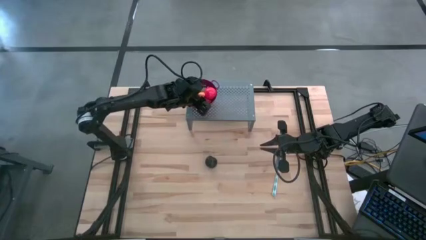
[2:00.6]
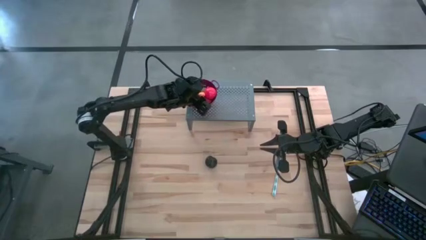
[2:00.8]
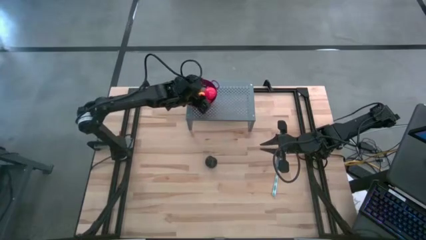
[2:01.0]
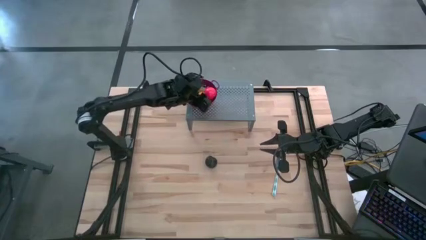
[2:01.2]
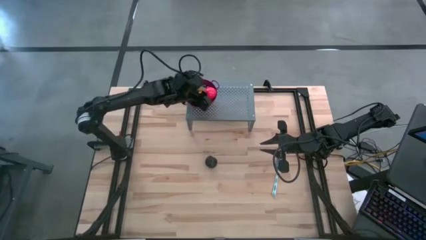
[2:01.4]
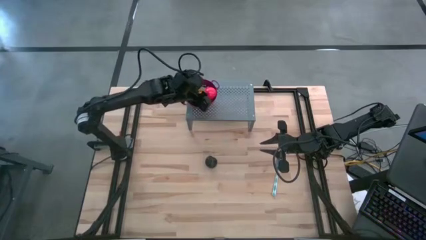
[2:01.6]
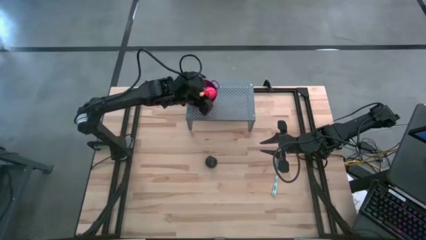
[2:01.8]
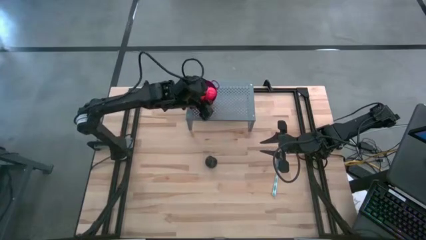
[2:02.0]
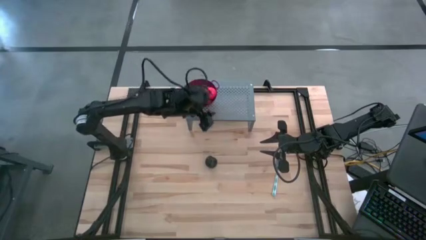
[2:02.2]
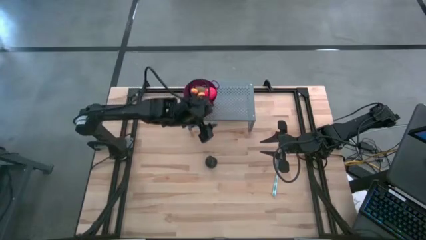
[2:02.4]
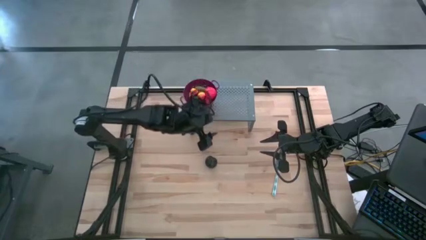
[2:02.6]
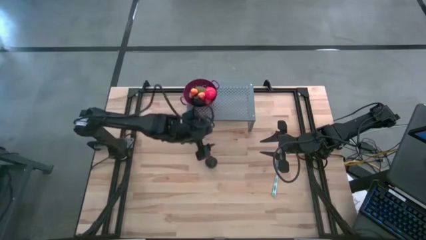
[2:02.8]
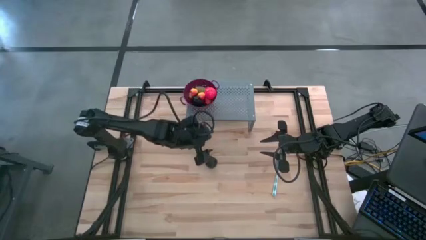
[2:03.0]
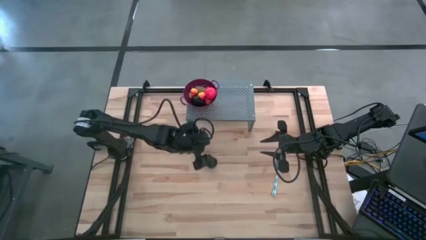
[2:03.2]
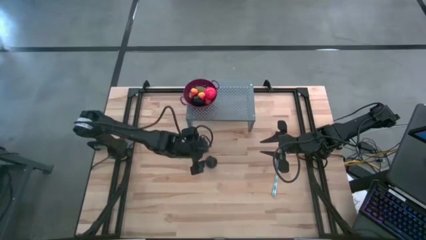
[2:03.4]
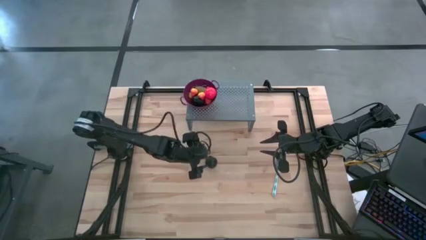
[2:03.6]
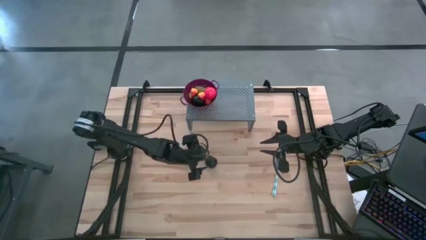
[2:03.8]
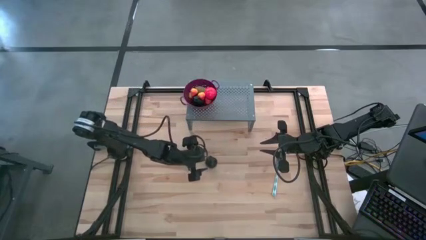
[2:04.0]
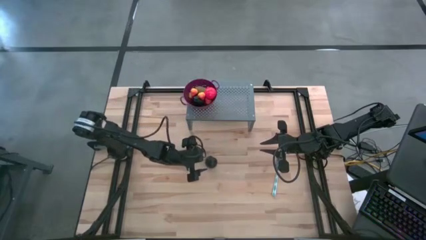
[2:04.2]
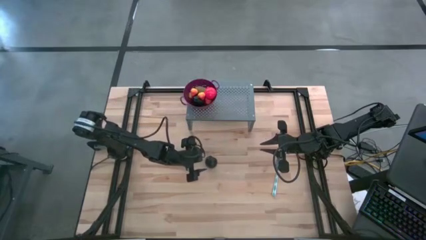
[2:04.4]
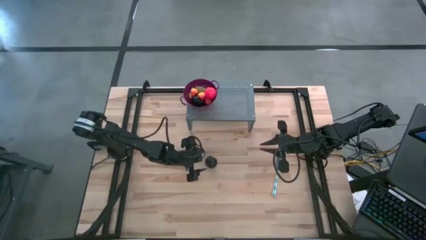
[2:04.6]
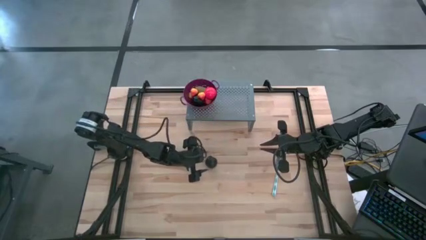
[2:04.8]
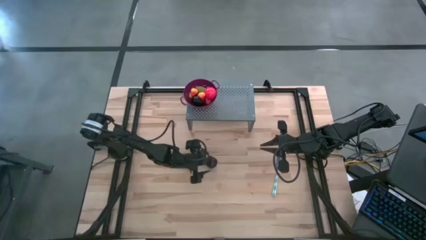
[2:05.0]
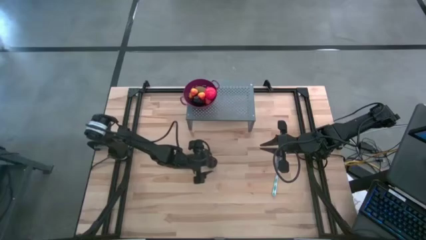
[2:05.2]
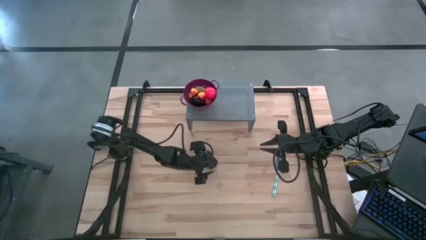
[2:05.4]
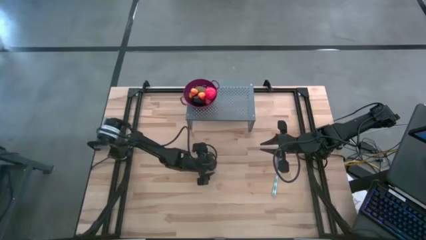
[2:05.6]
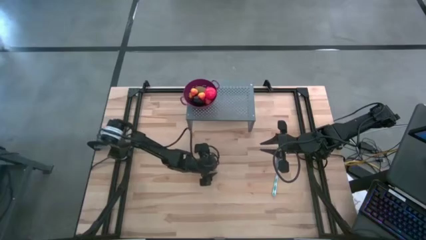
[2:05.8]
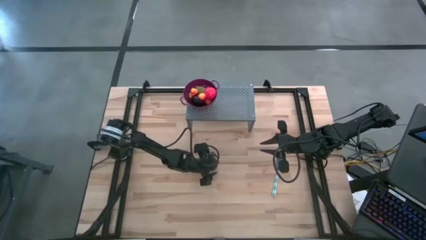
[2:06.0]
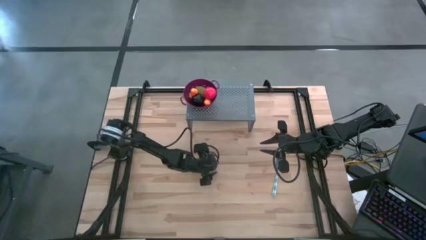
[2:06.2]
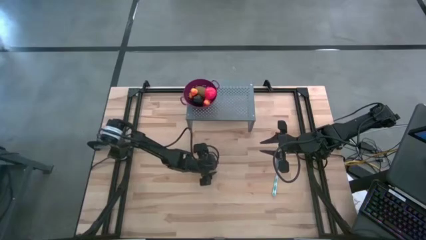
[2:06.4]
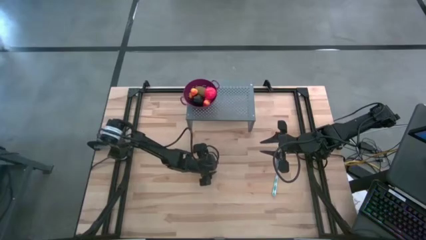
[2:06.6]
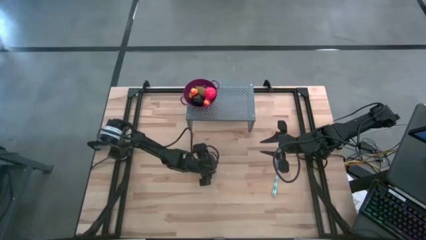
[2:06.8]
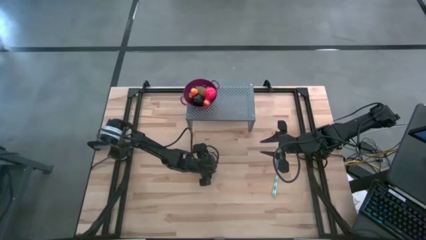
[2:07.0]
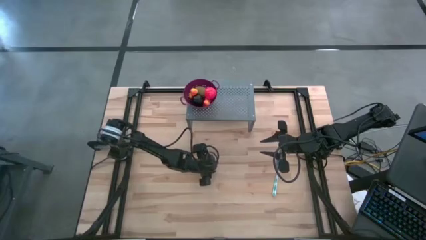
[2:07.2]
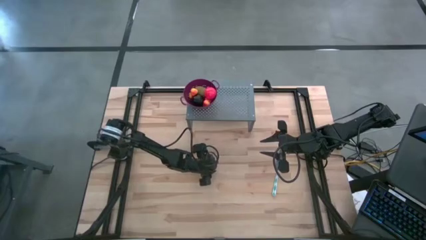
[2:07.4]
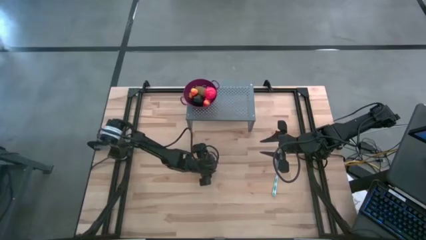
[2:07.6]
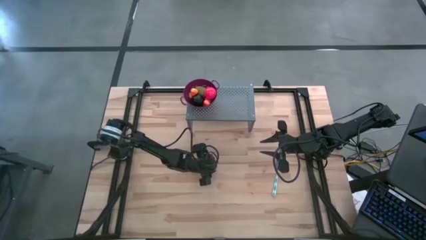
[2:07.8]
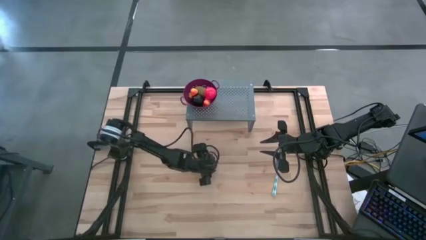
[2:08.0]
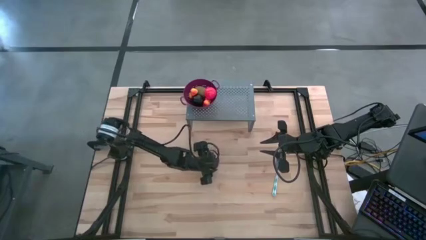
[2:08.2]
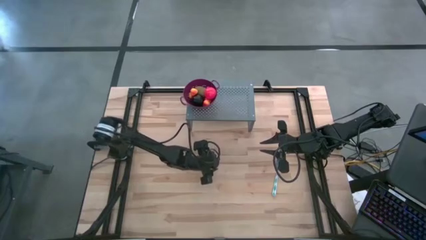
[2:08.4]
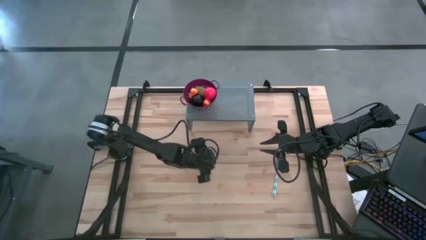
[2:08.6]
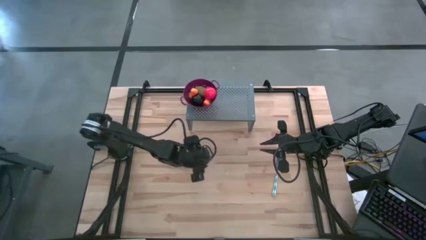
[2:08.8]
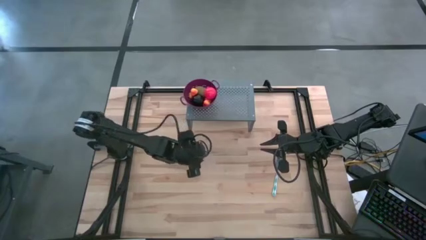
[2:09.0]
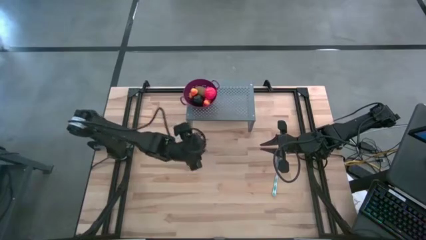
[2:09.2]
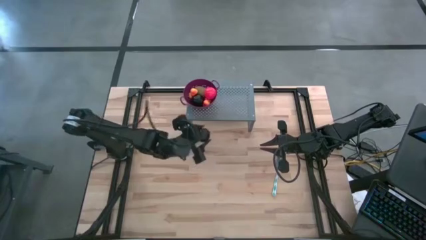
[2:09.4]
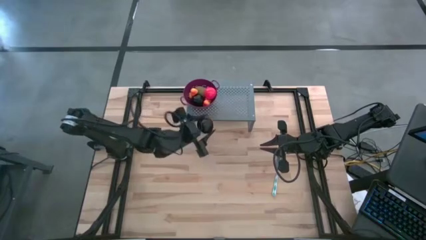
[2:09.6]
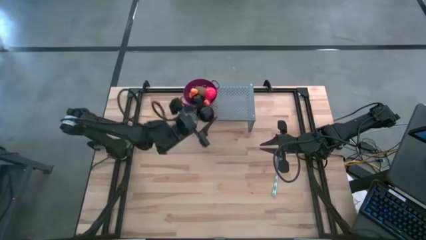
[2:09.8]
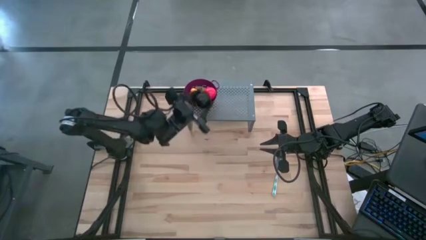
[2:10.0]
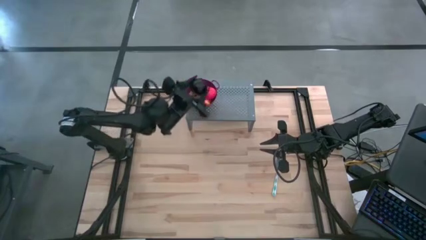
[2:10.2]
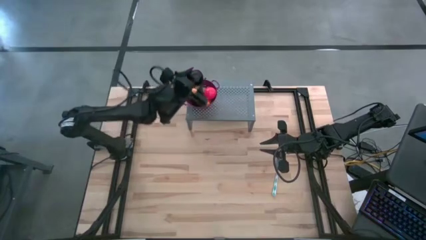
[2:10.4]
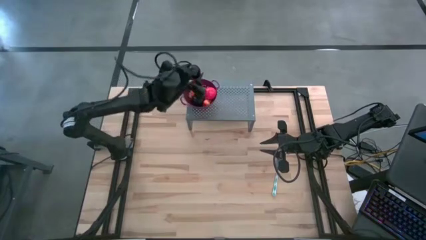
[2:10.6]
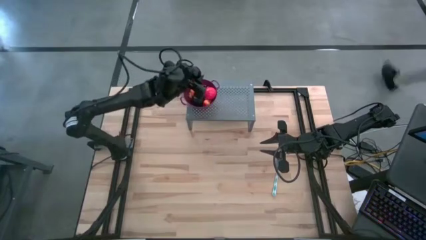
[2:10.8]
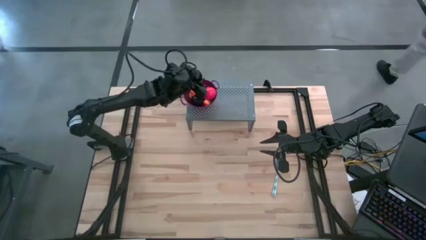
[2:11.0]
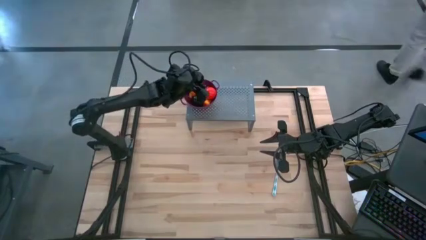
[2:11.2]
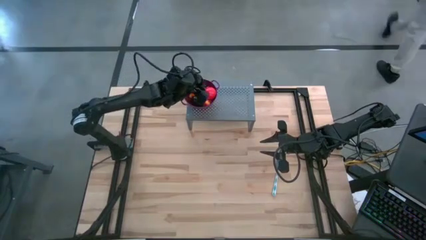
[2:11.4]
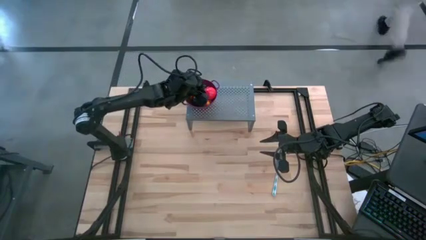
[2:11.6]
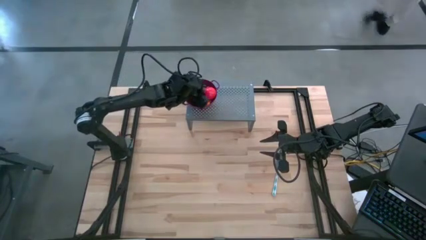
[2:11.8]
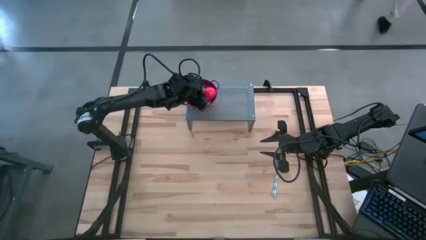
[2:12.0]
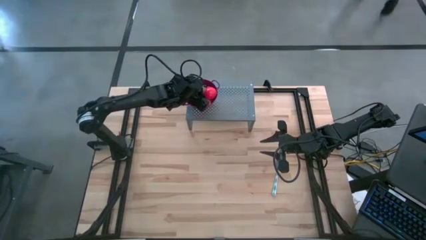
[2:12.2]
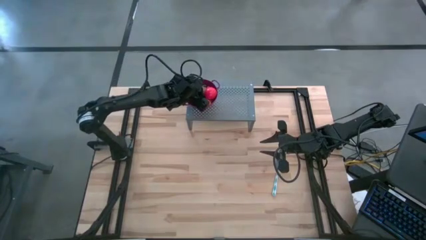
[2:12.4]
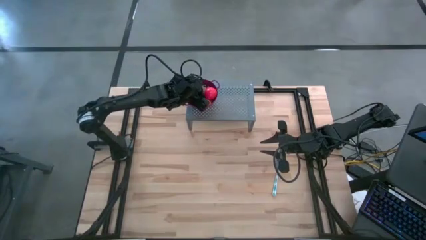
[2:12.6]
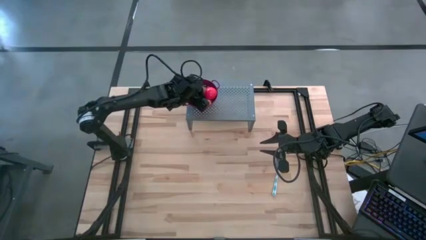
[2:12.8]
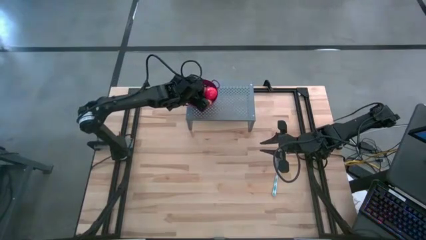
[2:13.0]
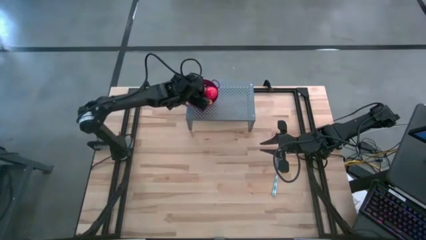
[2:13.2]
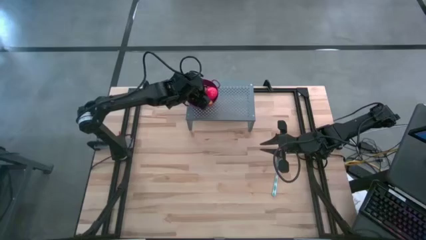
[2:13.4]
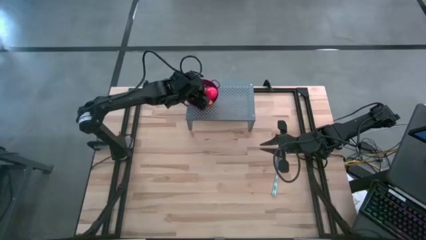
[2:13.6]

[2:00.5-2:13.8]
Task: Pick & Place Fruit
Put the black plum into the purple strainer bowl on the shelf

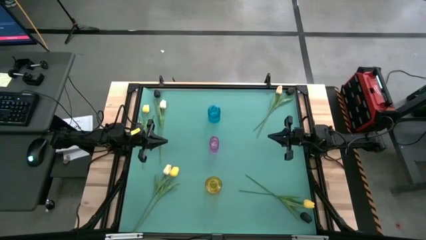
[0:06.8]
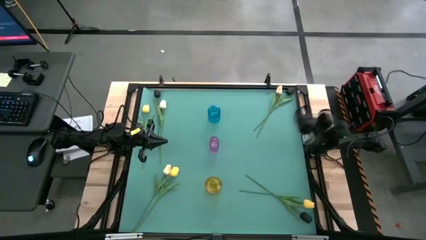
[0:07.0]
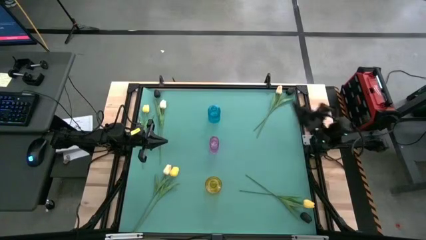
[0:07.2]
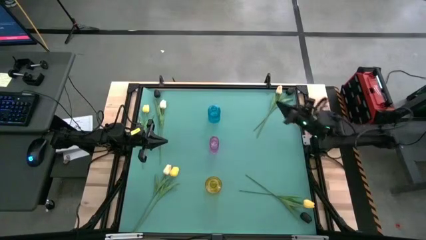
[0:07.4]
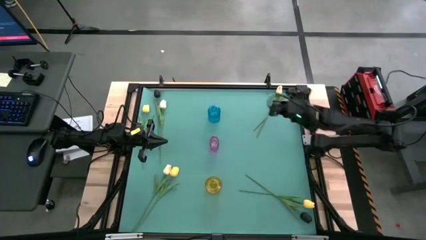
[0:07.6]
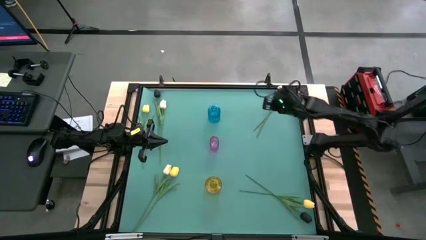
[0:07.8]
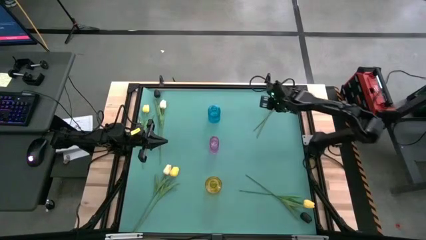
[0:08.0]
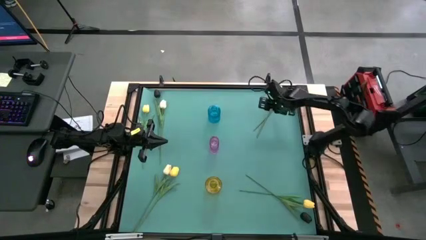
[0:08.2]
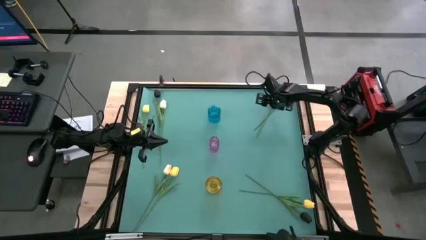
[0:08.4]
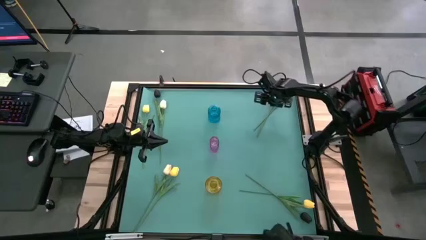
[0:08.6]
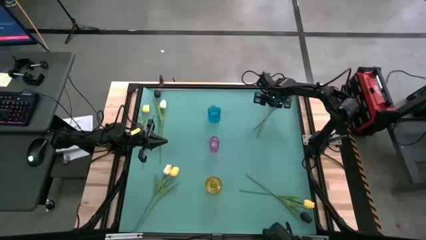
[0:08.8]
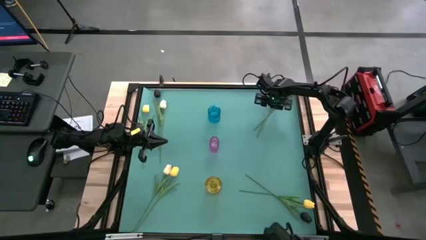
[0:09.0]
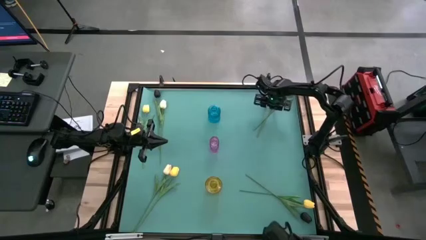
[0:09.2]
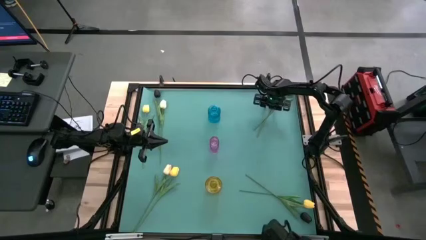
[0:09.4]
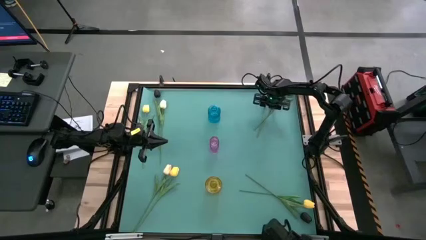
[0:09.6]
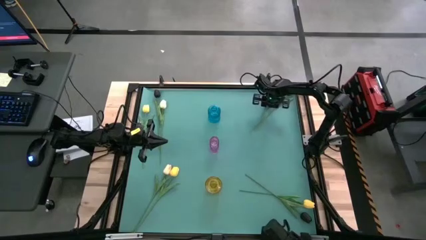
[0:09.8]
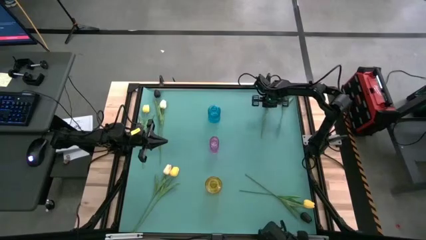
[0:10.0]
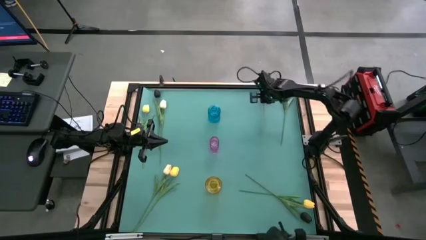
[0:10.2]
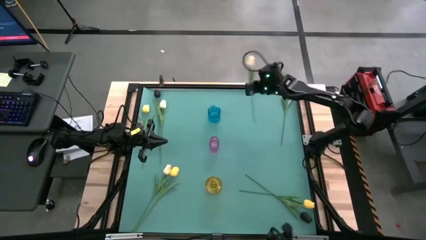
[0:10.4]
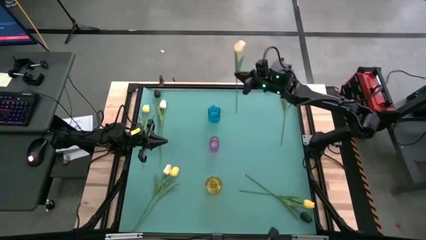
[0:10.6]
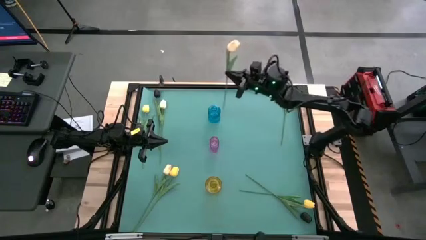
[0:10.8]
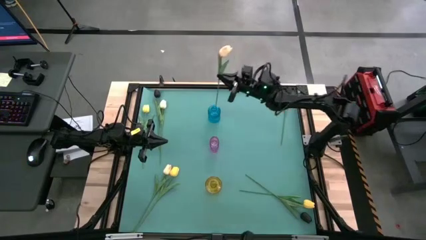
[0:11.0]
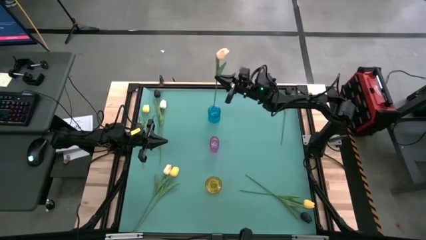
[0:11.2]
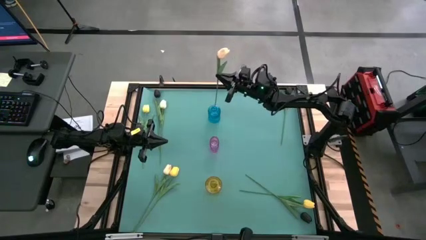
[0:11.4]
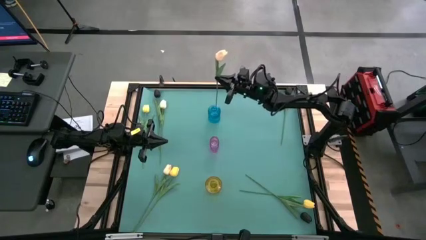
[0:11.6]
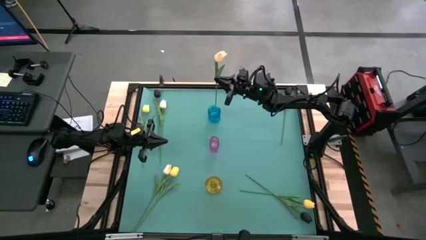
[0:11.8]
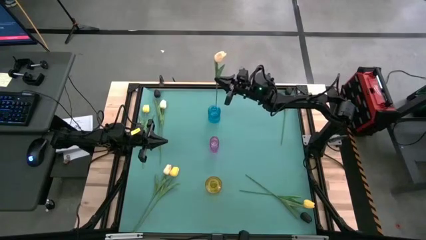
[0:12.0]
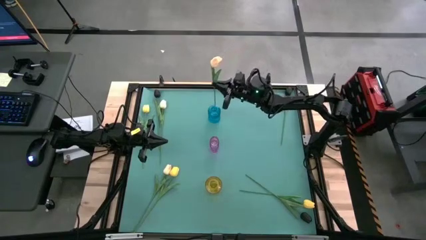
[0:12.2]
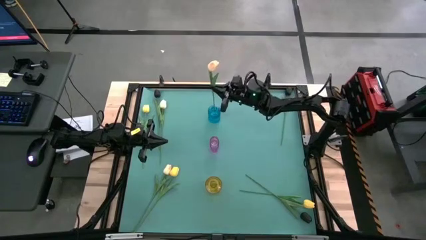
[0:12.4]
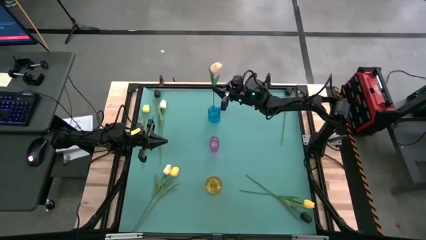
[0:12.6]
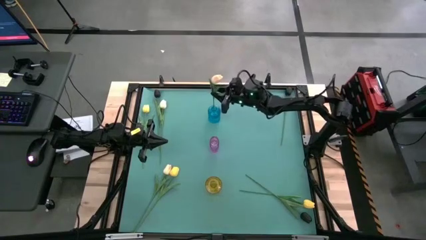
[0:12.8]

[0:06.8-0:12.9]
Task: Sort flowers into vase by color
Put the top right white flower into the blue vase
